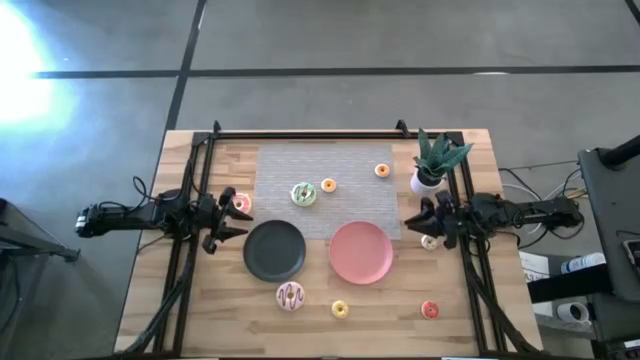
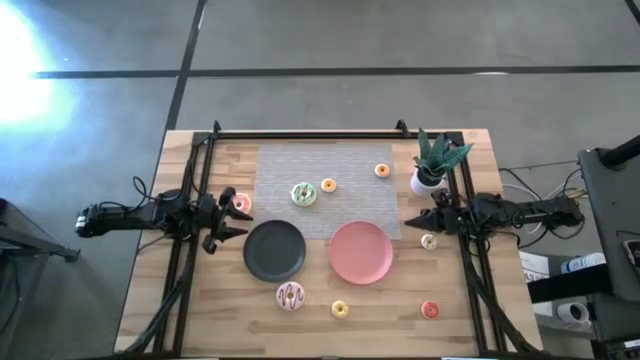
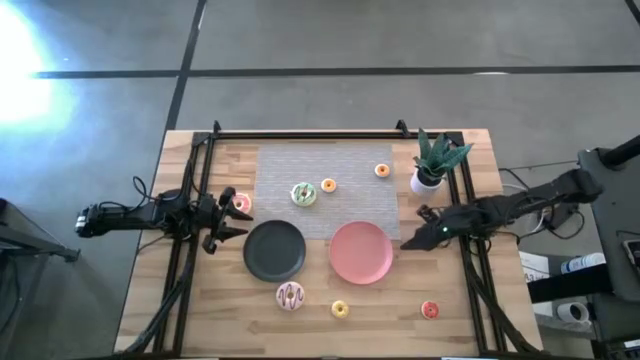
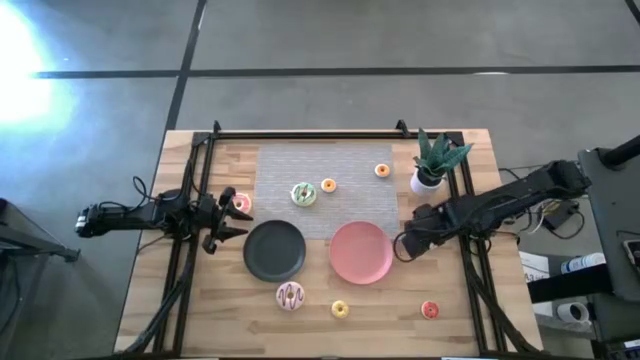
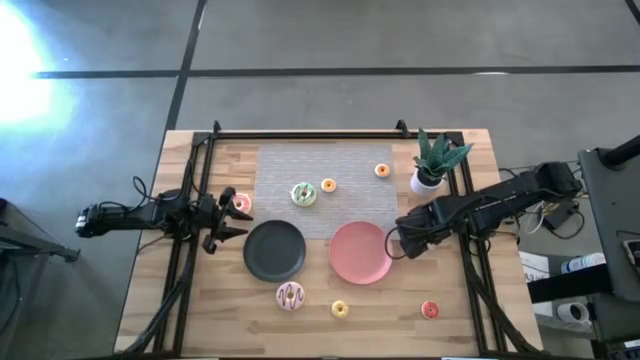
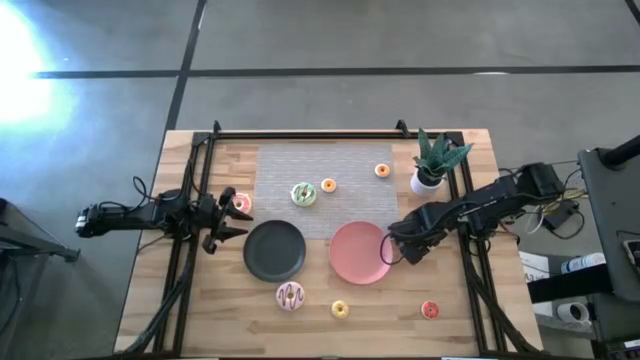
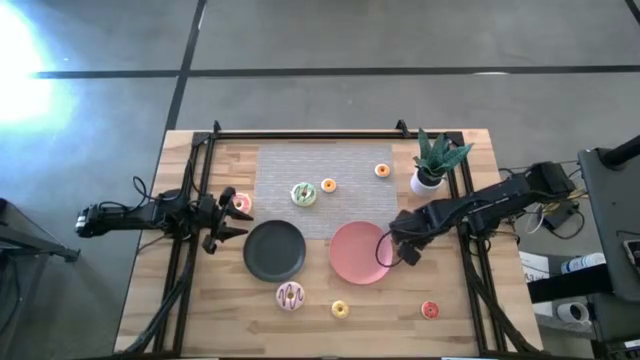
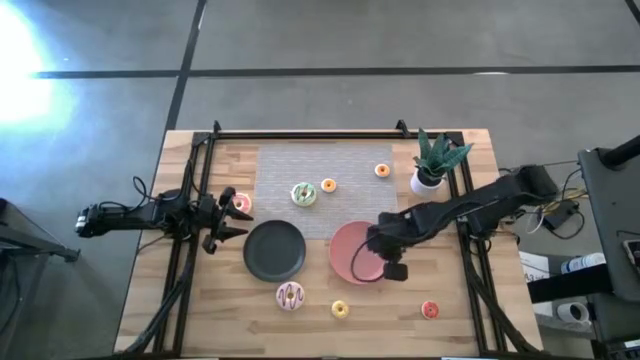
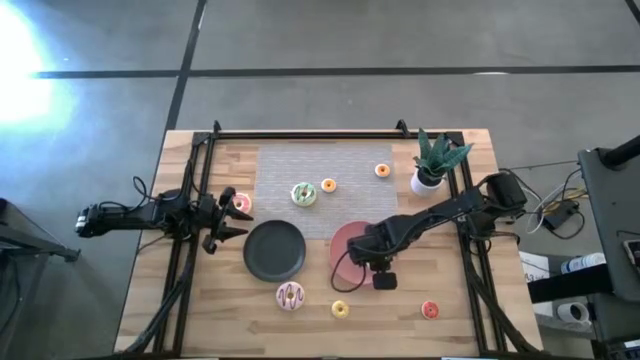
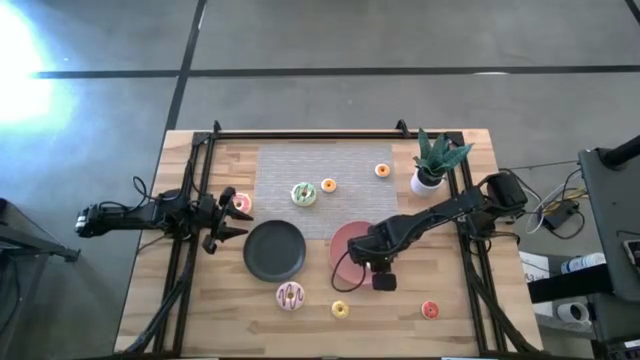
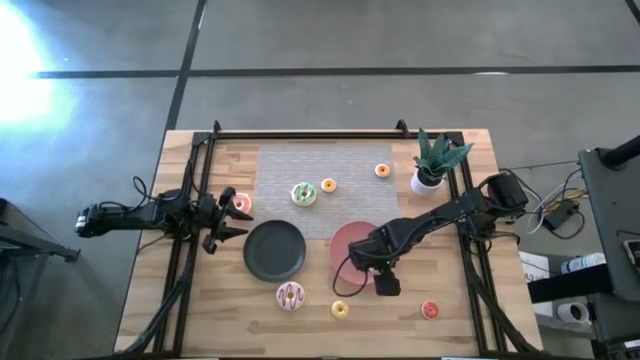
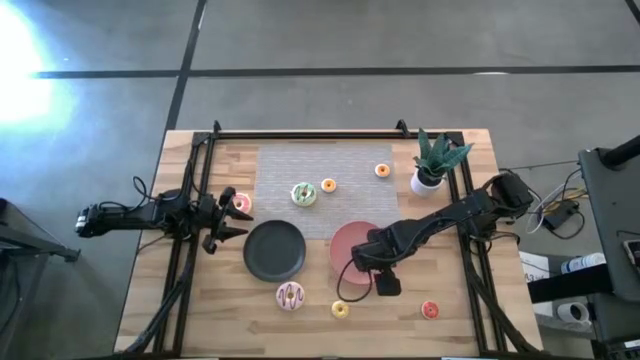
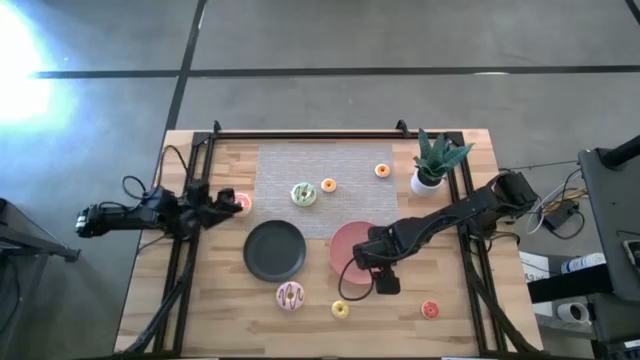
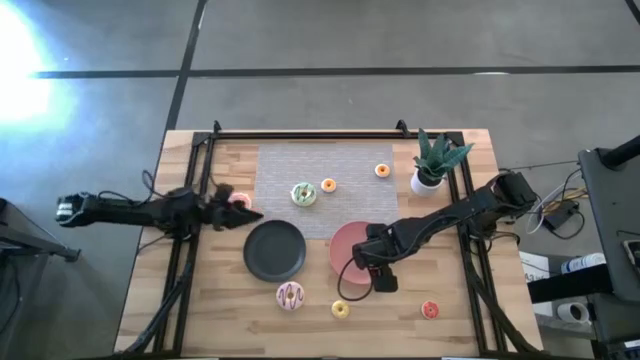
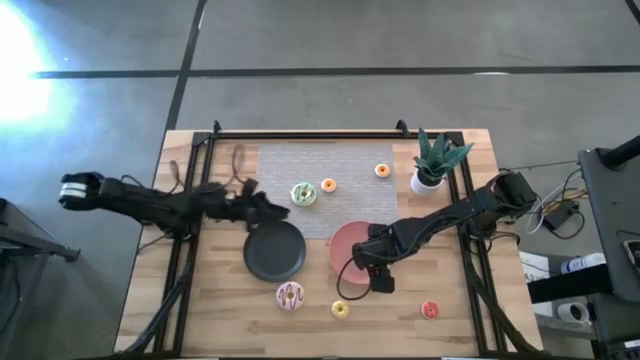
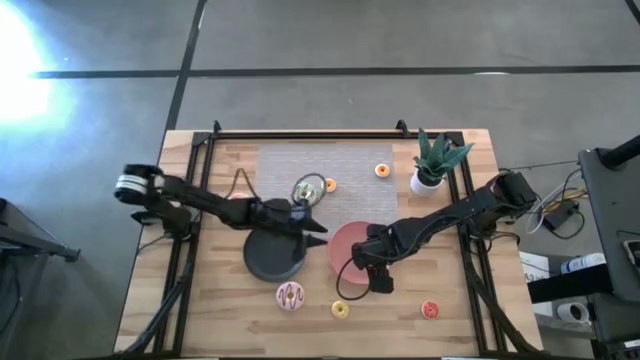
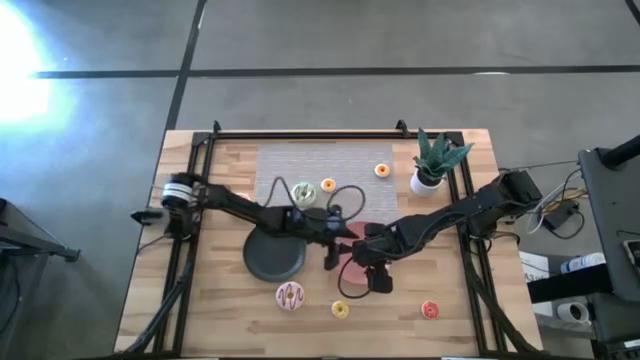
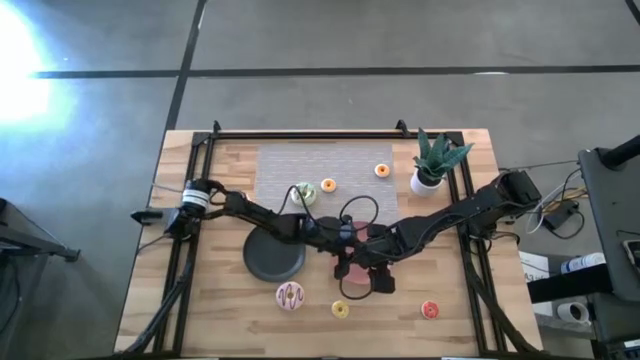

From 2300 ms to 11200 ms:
Task: Pick & Place donuts
Put the small white donut on the pink plate

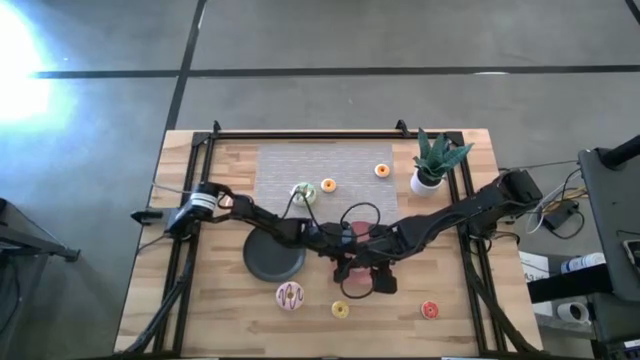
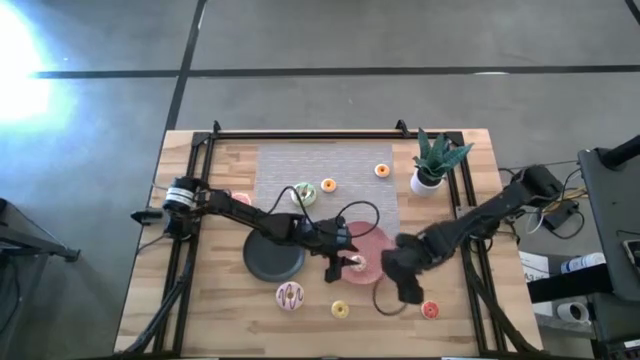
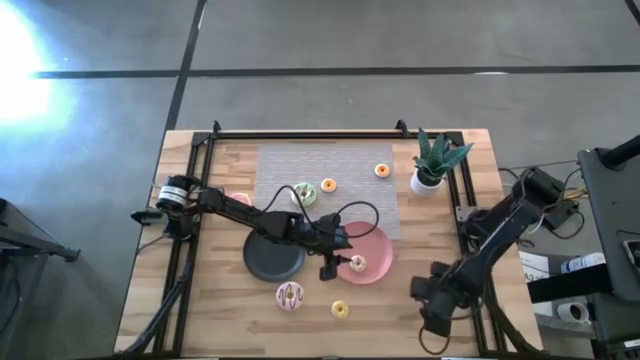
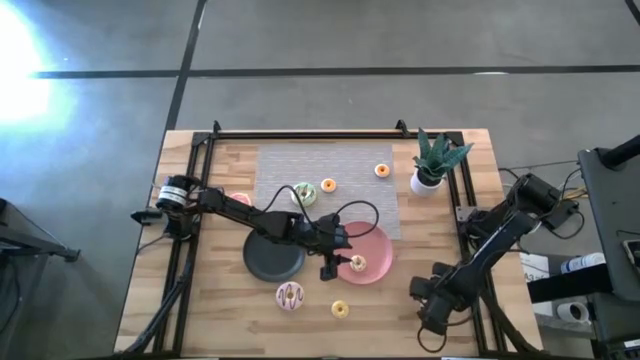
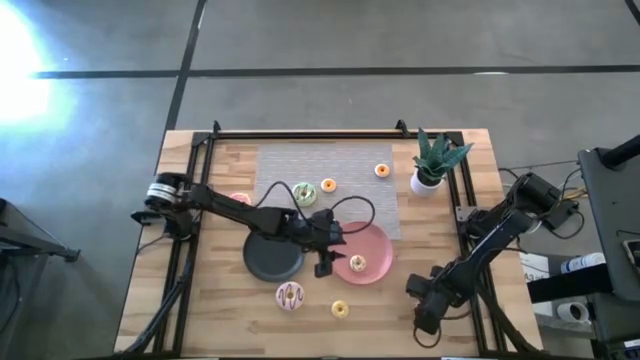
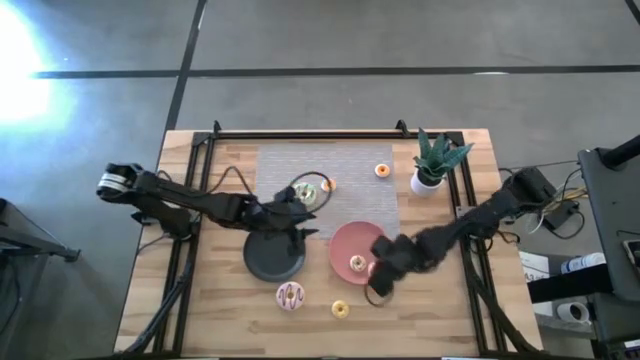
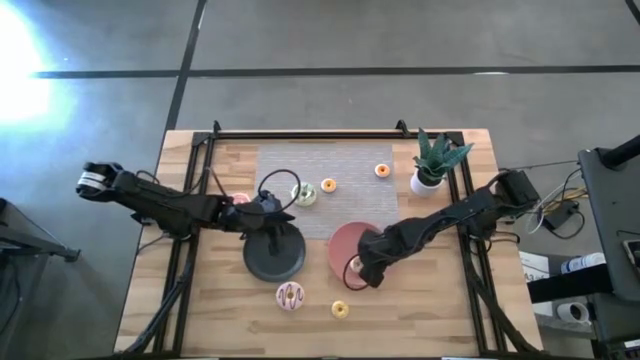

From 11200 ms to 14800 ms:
Put the small orange donut on the pink plate

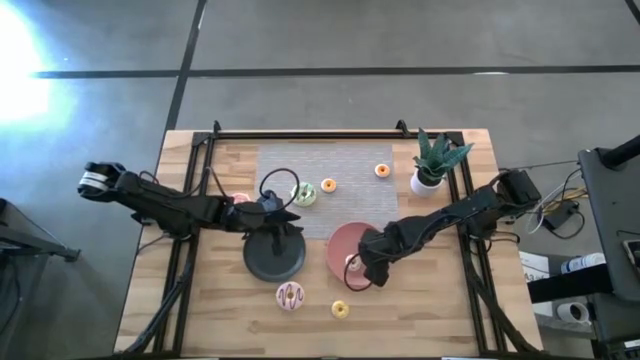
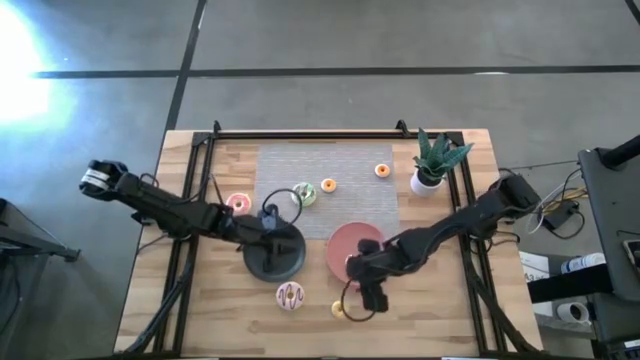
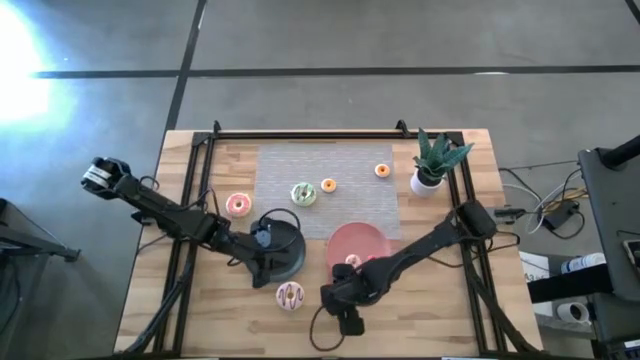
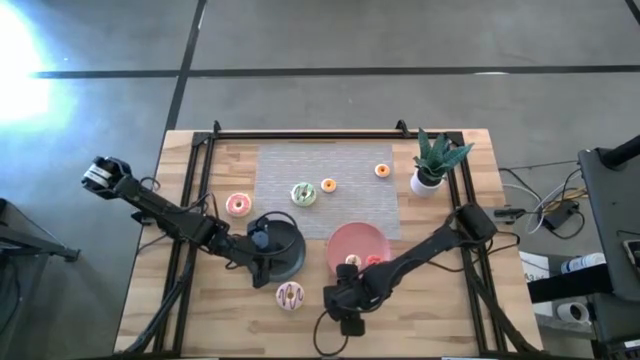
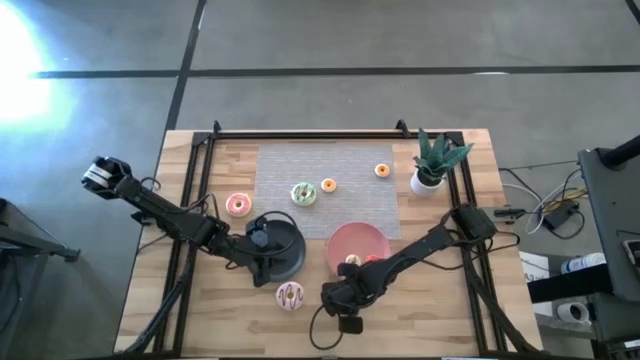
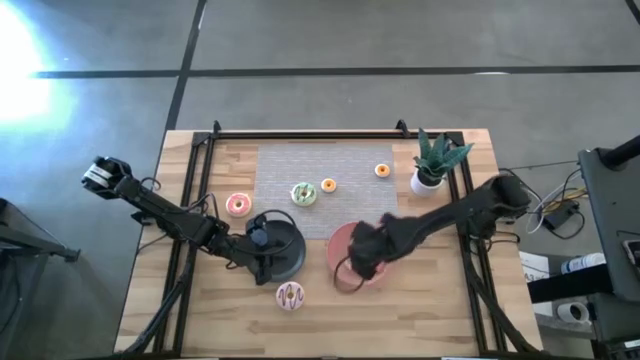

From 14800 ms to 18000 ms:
Put the small yellow donut on the pink plate

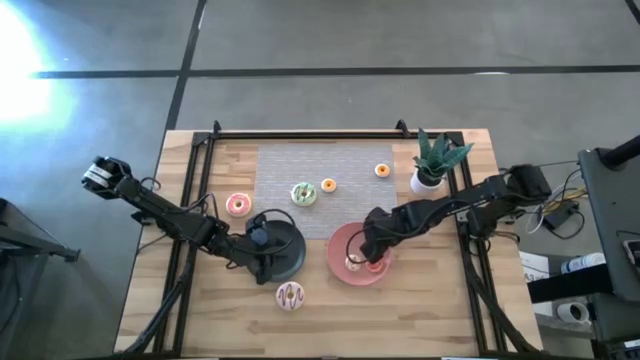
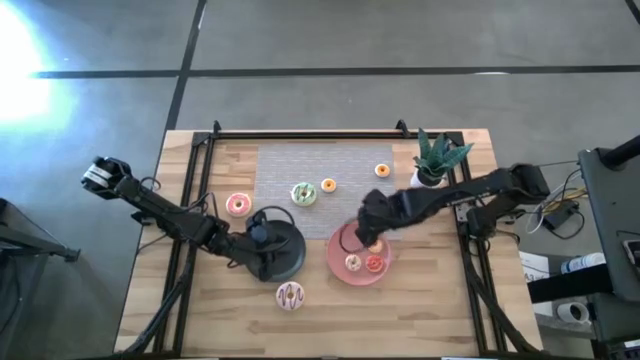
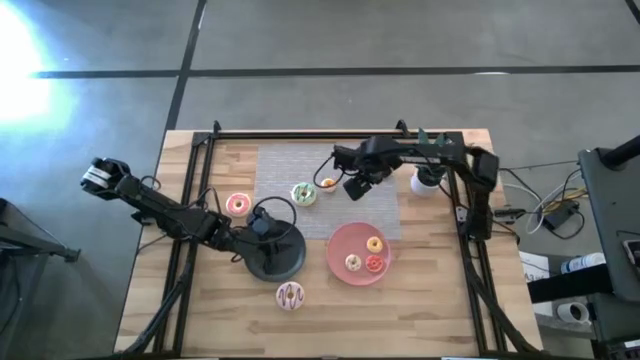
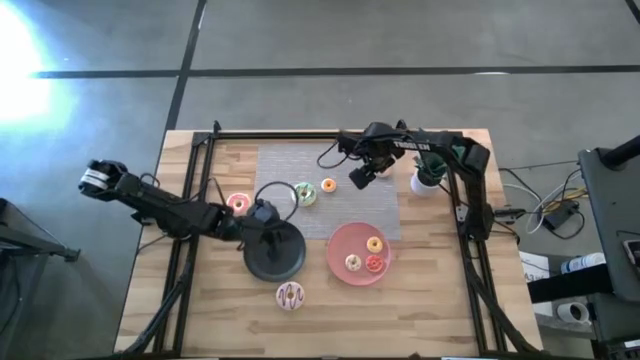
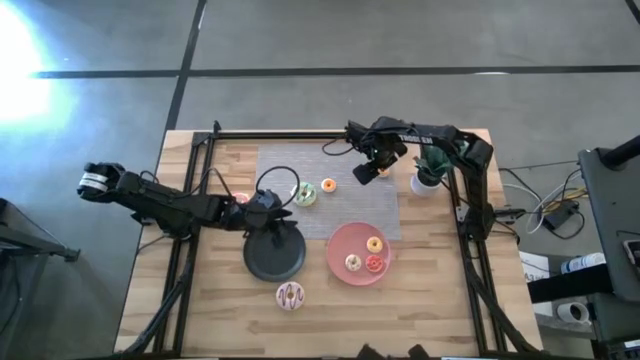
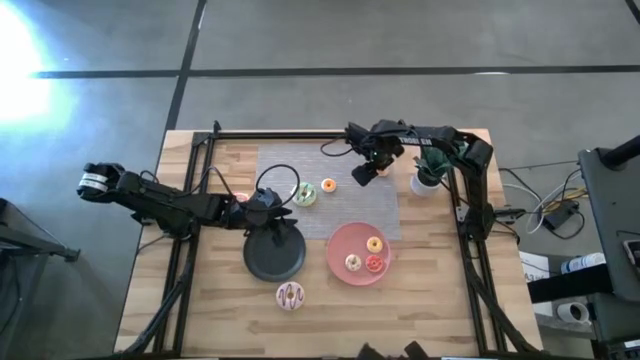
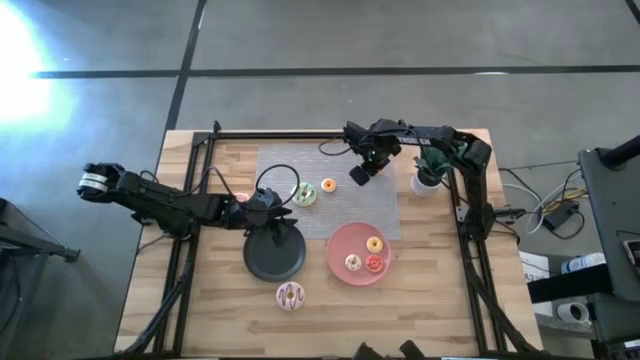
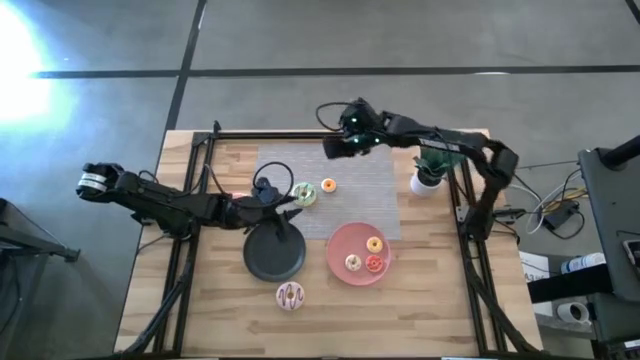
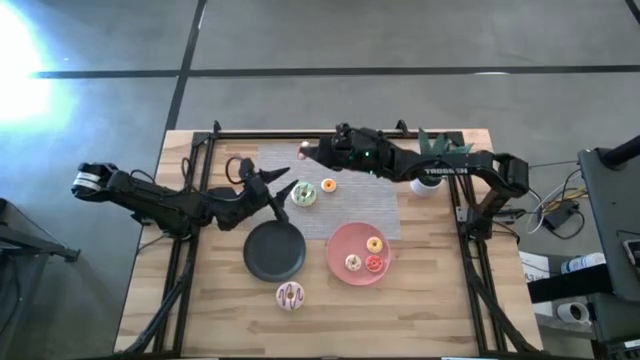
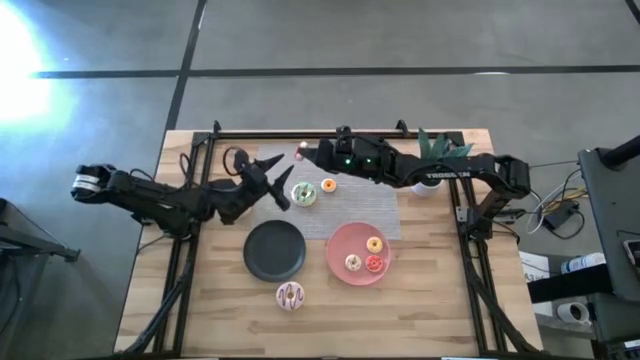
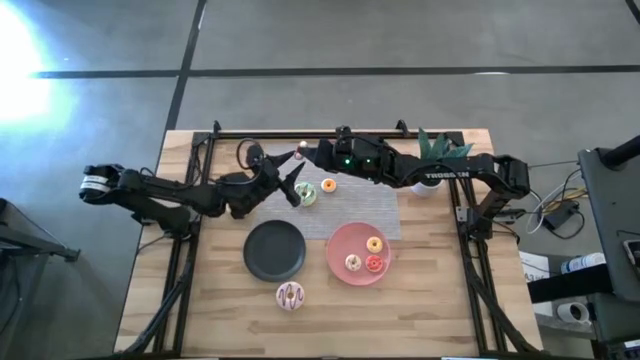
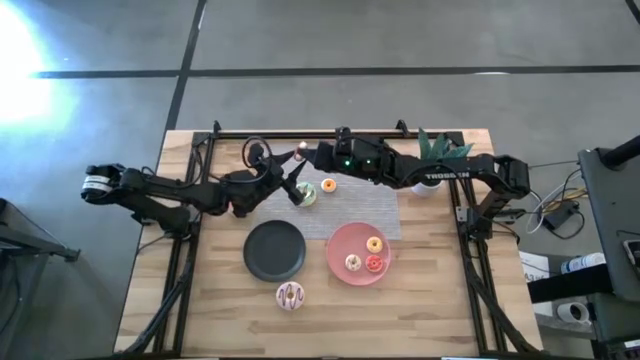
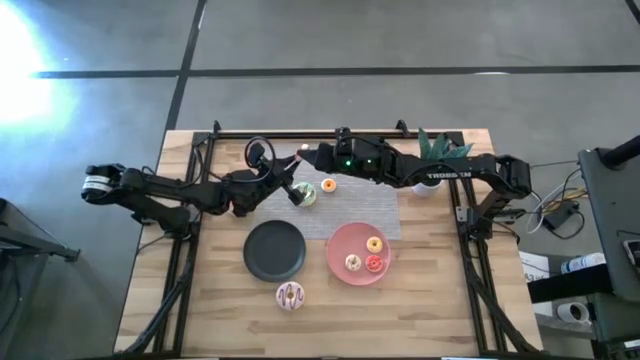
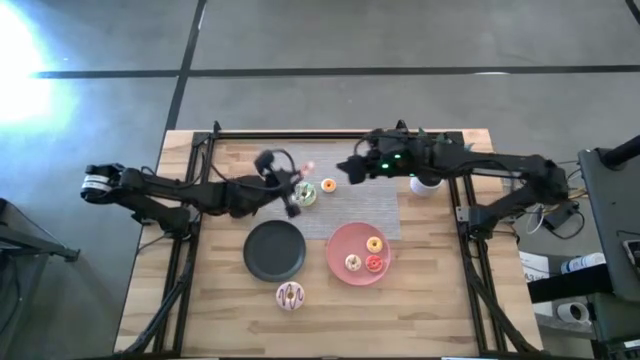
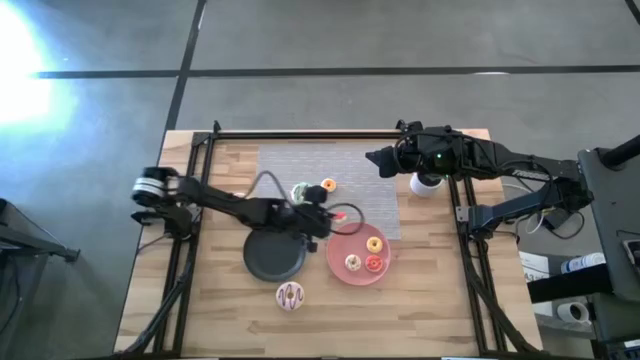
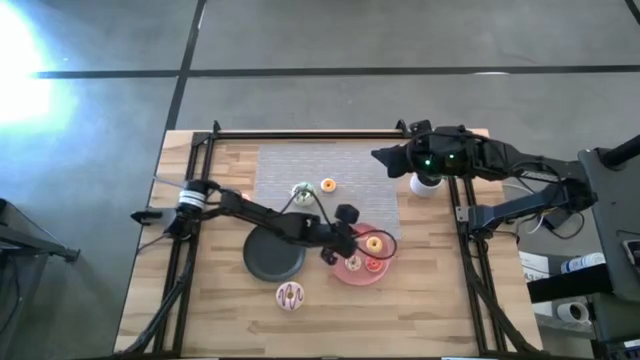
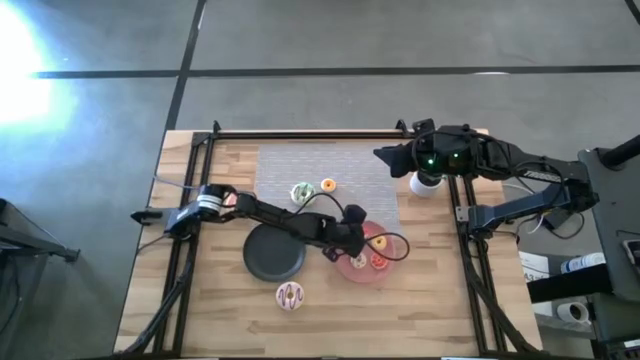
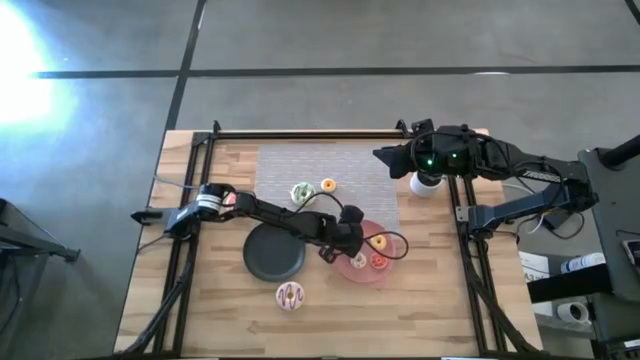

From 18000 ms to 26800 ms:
Put the small pink donut on the pink plate
